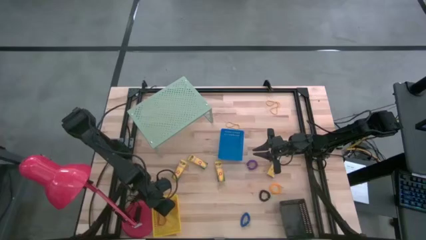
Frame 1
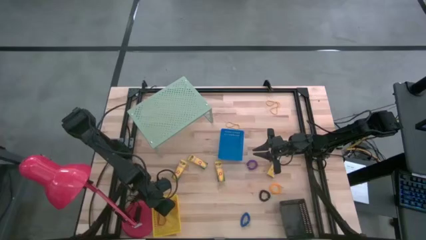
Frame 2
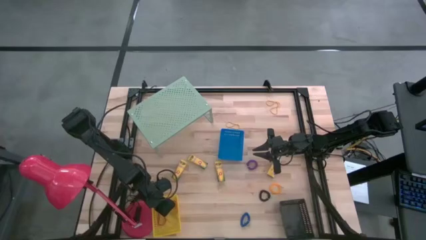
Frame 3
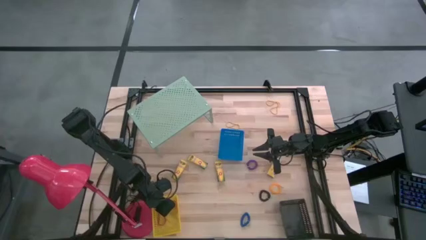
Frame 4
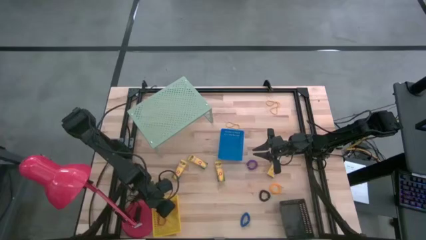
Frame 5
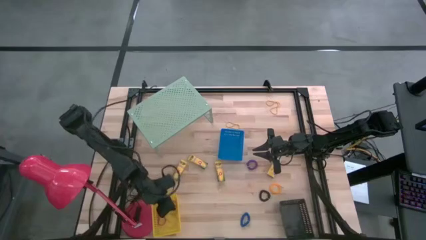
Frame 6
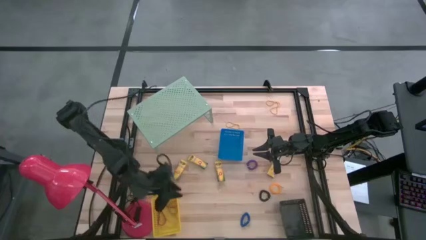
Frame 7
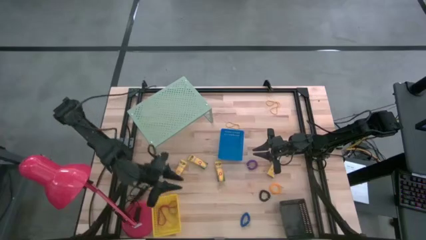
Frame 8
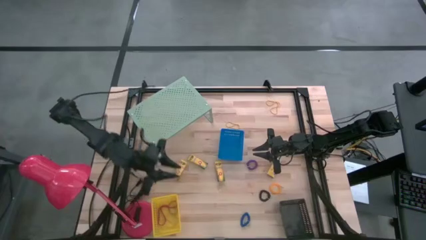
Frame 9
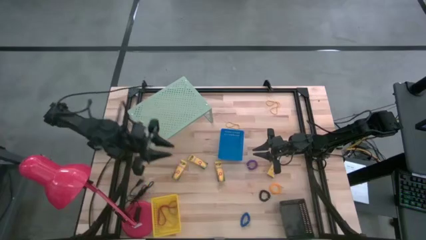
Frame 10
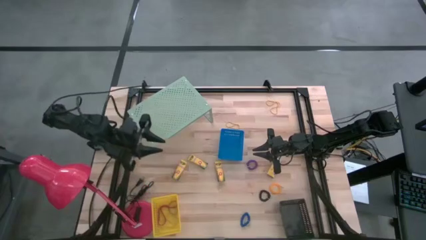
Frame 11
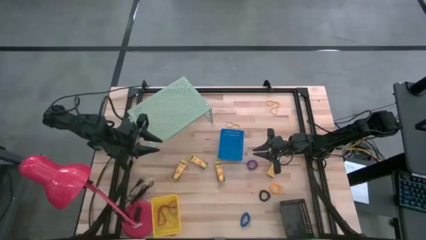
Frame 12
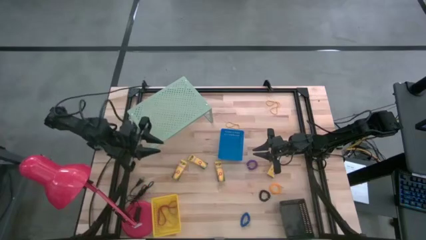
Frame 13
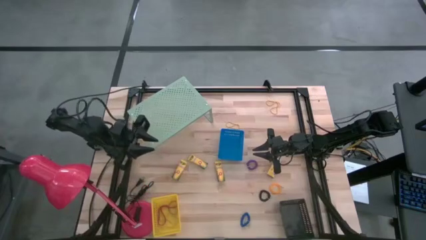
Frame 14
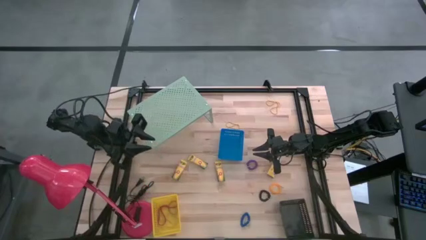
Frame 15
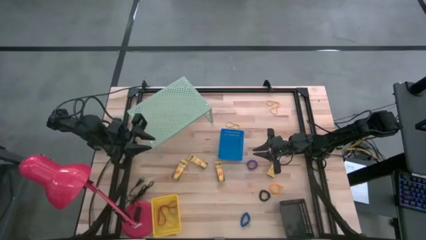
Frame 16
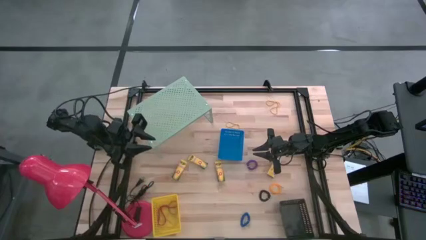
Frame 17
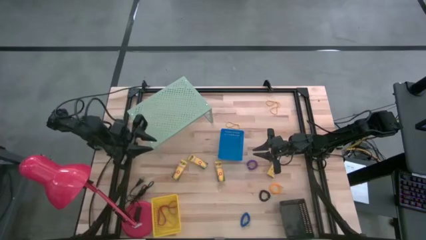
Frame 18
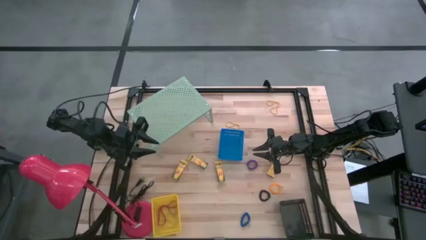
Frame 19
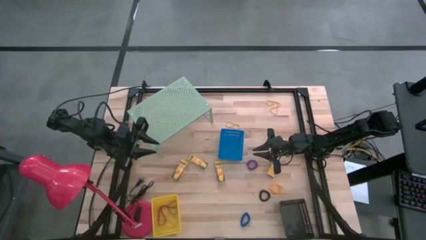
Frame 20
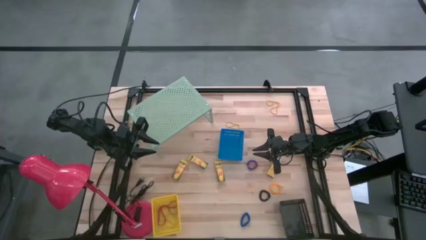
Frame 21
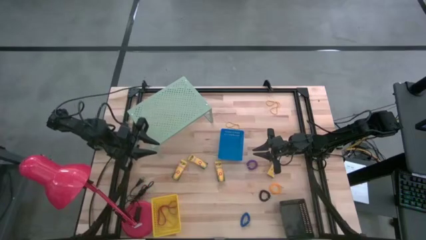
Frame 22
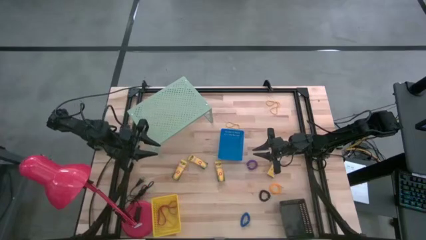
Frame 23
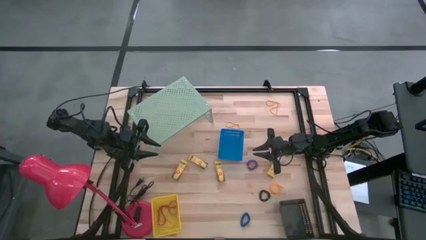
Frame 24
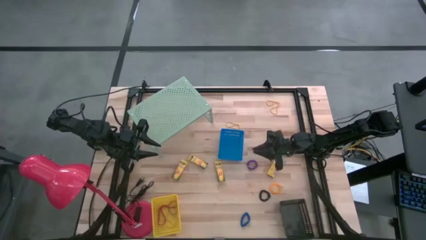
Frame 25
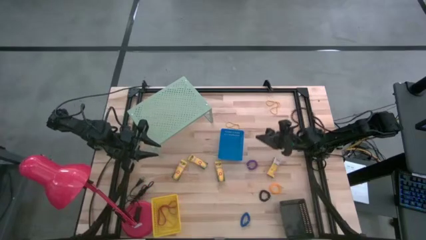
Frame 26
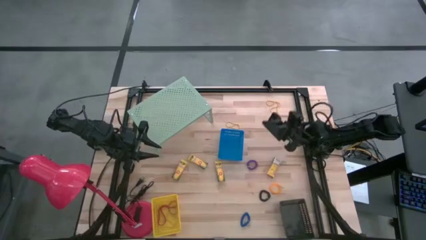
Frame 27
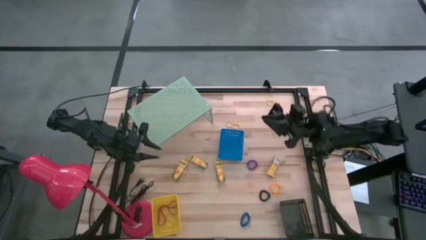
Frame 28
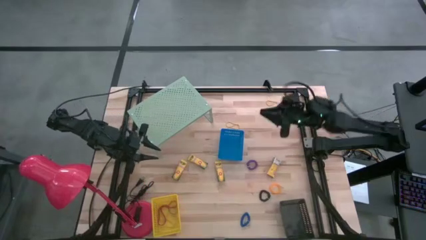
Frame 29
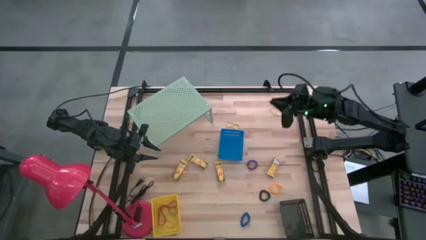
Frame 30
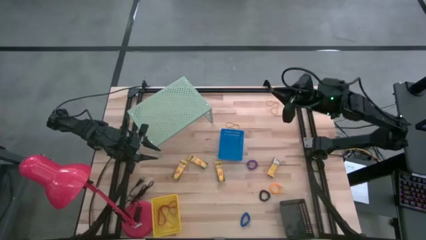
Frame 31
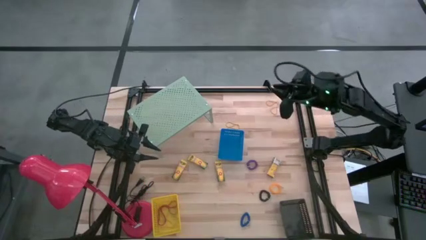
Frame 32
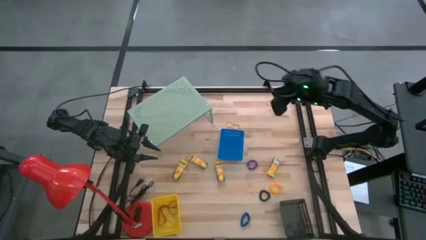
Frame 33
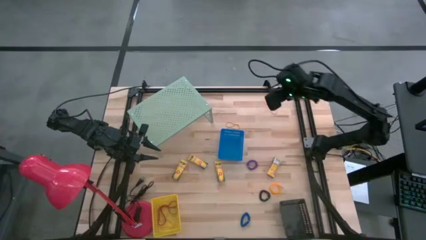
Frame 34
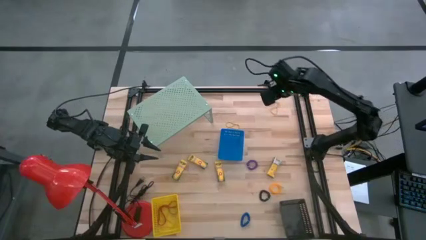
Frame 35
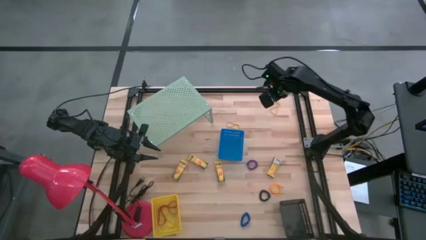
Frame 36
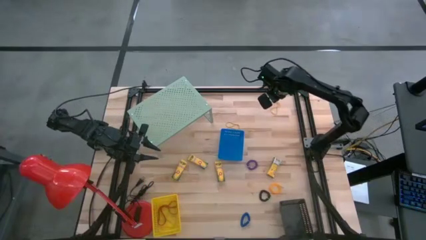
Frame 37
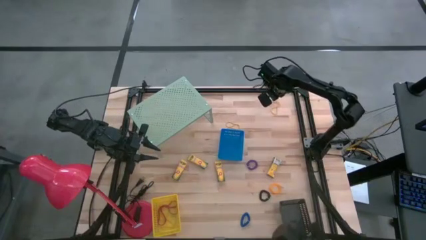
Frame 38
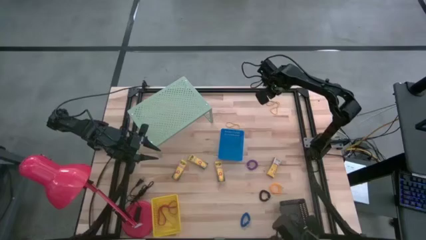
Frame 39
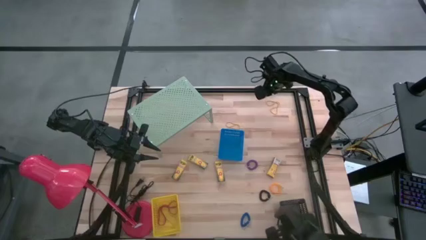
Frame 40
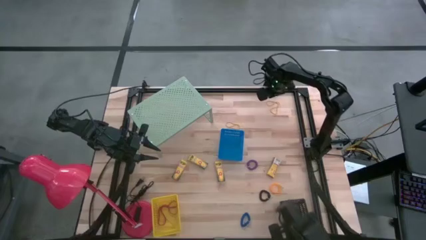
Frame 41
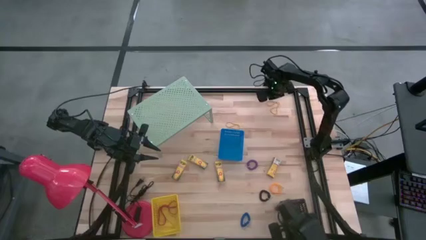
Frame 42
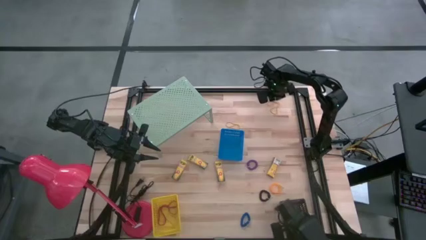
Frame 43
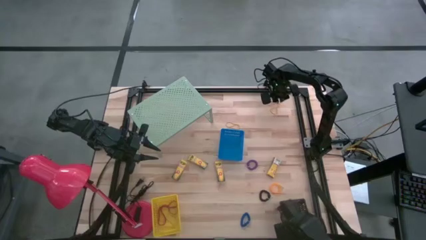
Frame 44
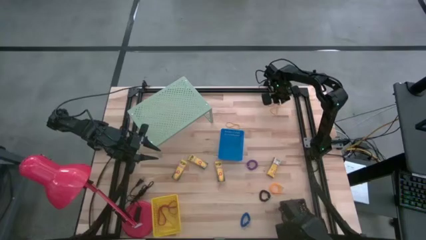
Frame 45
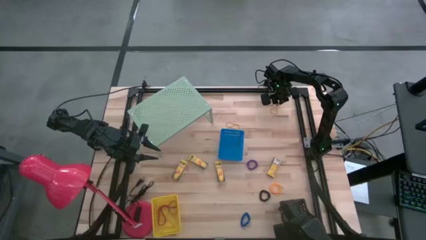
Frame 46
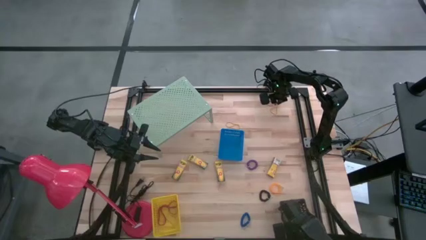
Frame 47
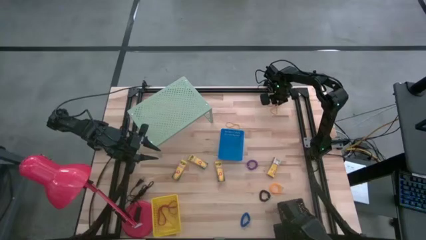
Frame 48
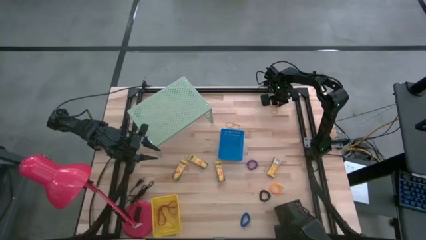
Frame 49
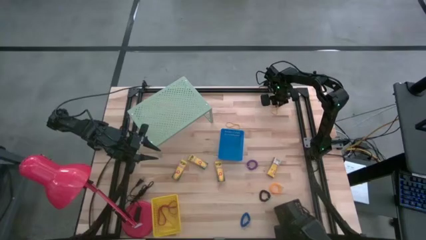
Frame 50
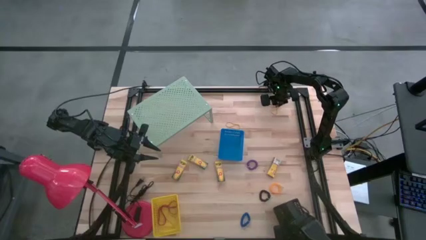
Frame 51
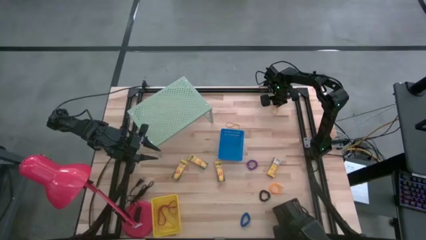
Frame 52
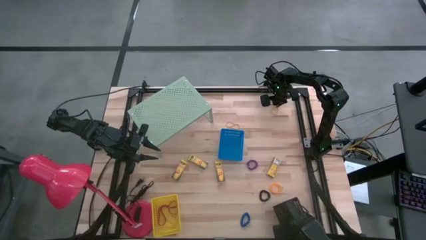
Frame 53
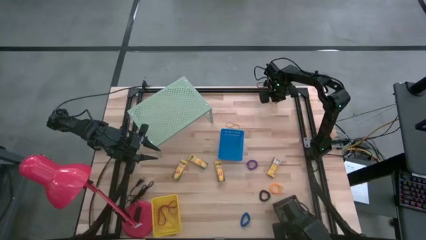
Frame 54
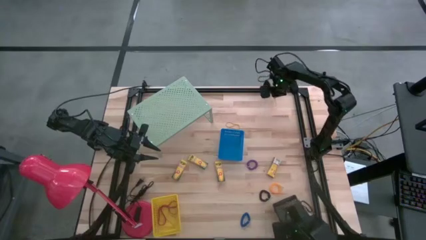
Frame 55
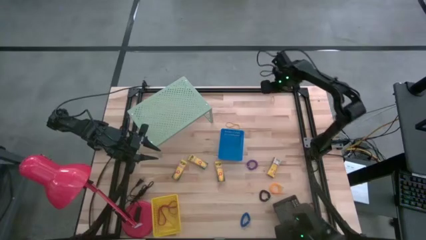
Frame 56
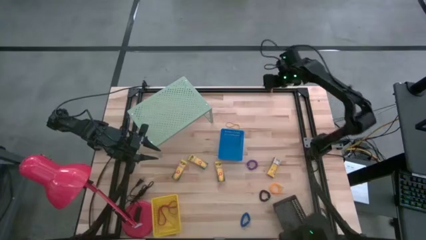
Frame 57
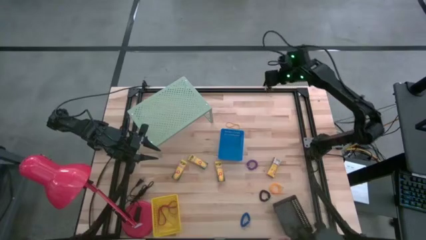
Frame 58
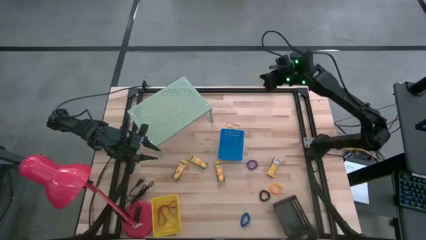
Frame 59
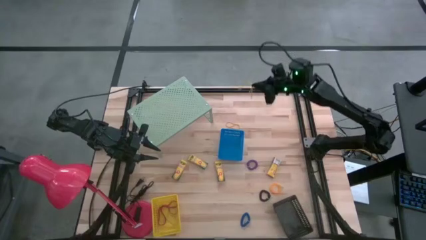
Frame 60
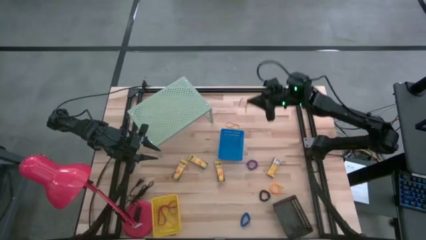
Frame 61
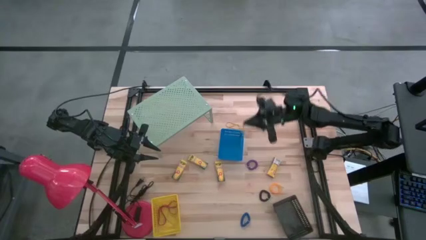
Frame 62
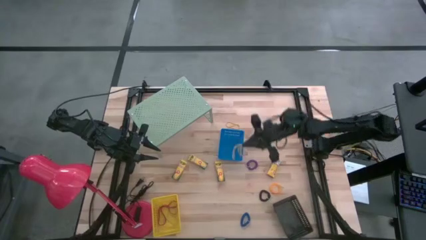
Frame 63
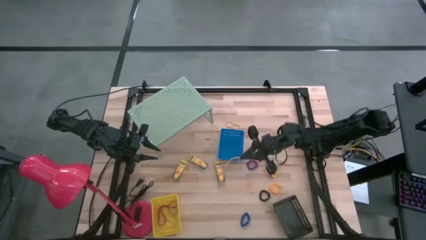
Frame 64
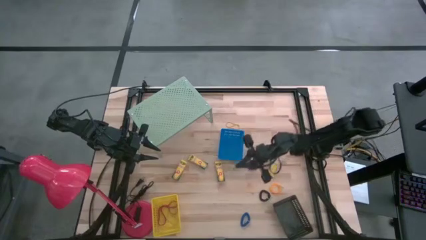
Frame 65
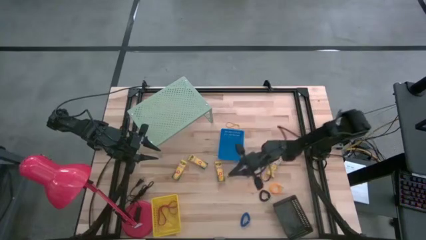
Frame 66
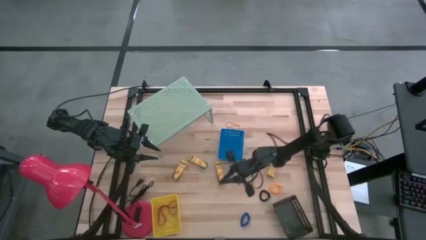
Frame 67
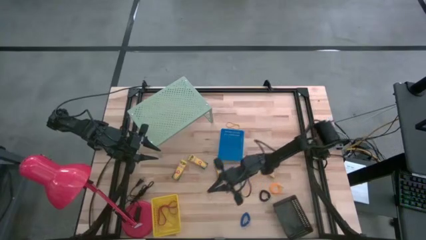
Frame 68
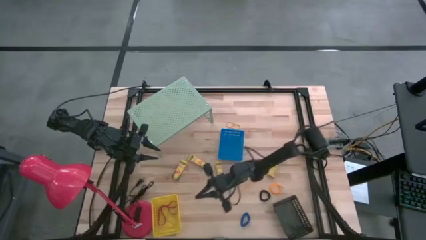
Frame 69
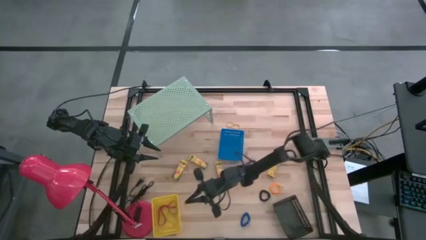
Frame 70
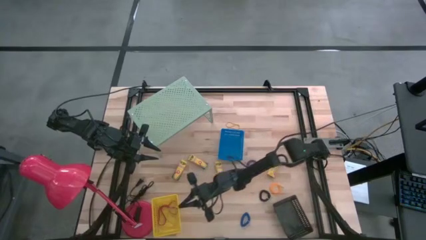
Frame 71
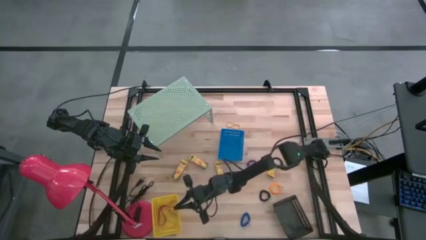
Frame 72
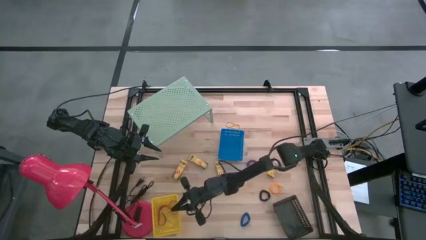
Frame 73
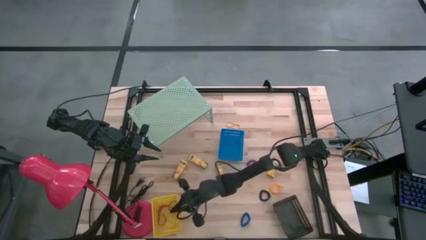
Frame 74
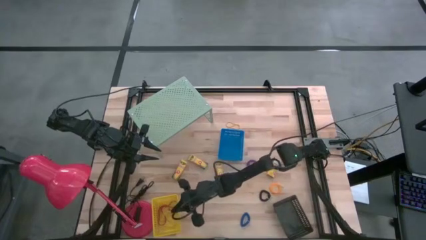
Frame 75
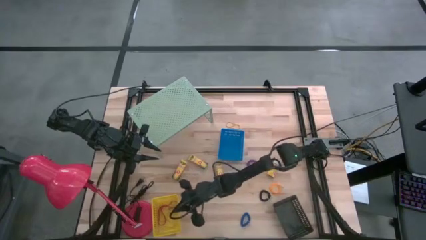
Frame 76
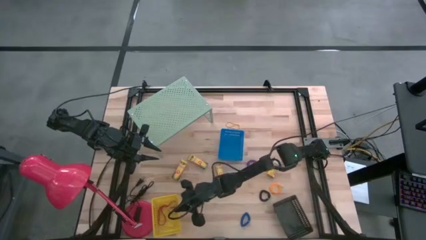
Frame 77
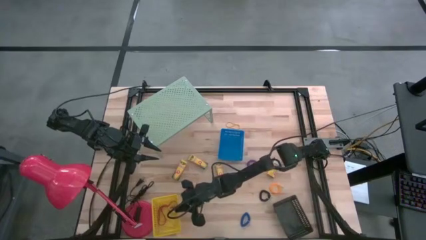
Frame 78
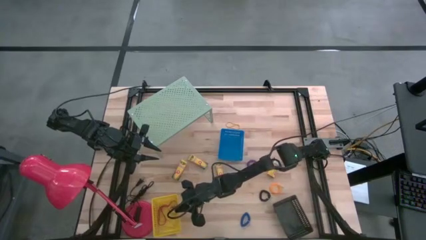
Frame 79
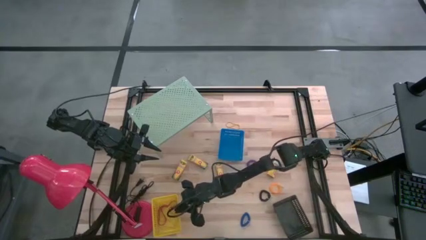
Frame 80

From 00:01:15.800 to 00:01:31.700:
Task: Pick & Place Office Desk Supplies
Put the yellow rubber band into the yellow basket
